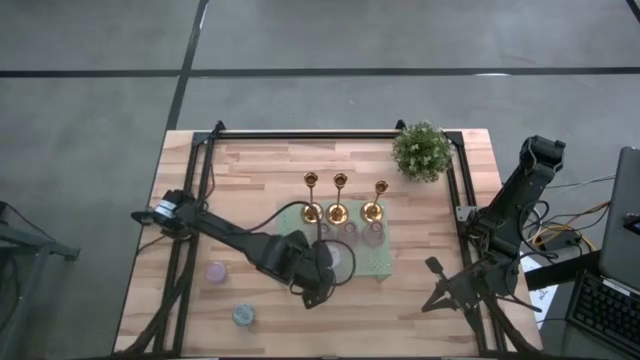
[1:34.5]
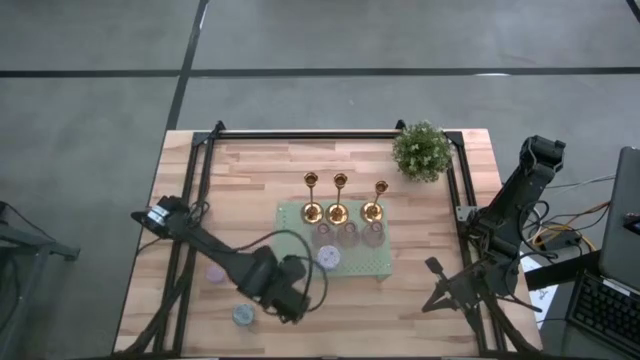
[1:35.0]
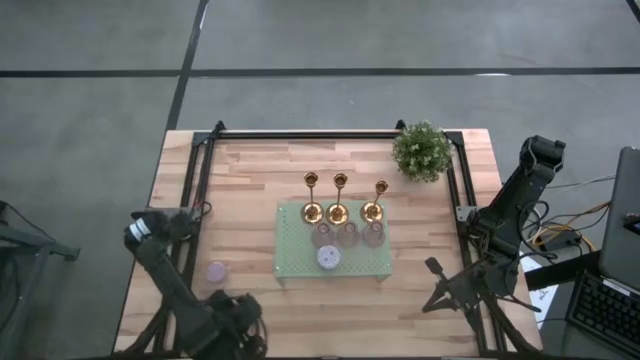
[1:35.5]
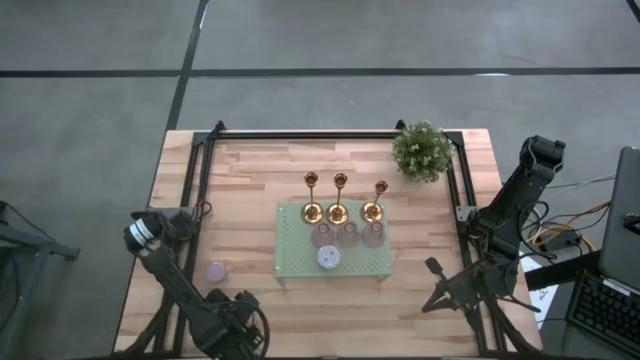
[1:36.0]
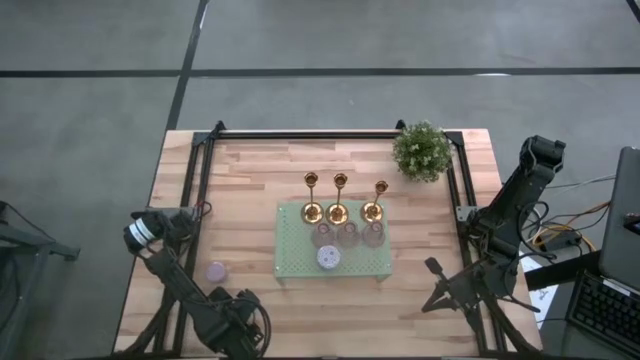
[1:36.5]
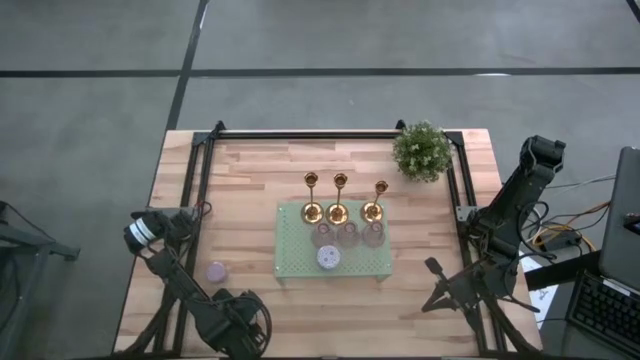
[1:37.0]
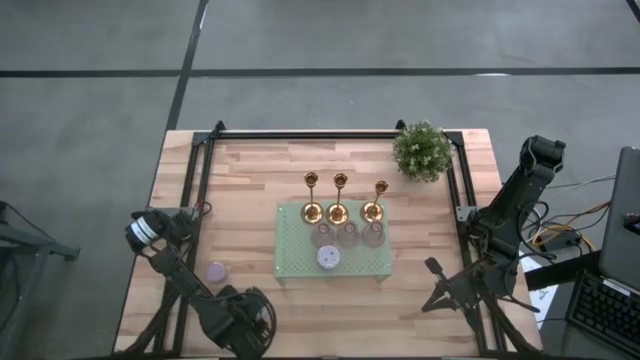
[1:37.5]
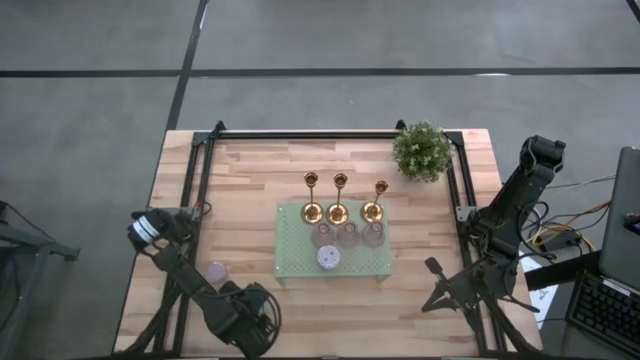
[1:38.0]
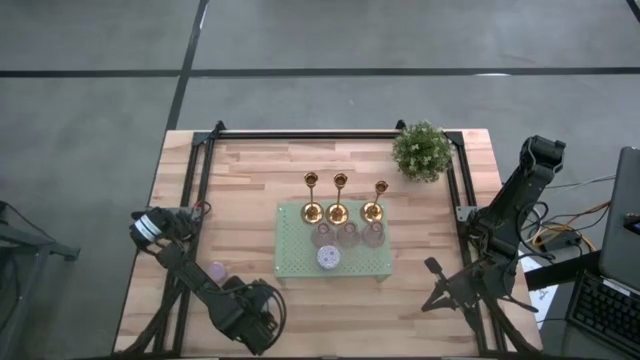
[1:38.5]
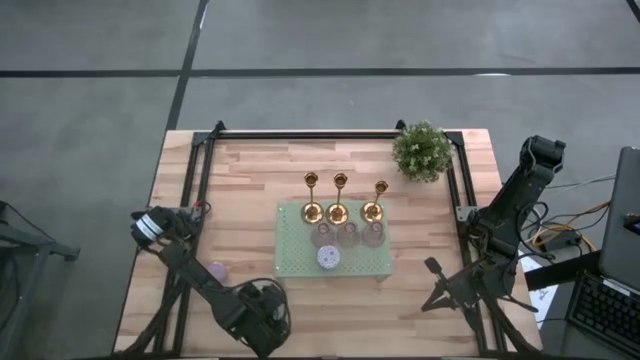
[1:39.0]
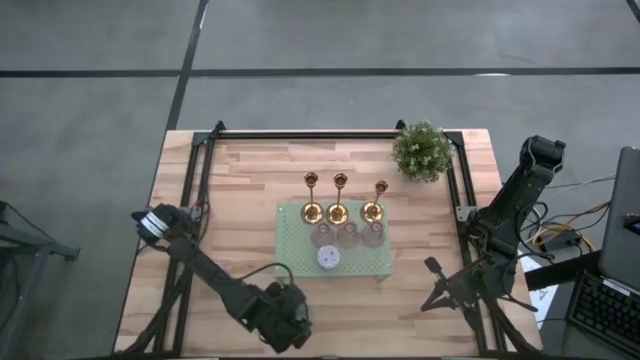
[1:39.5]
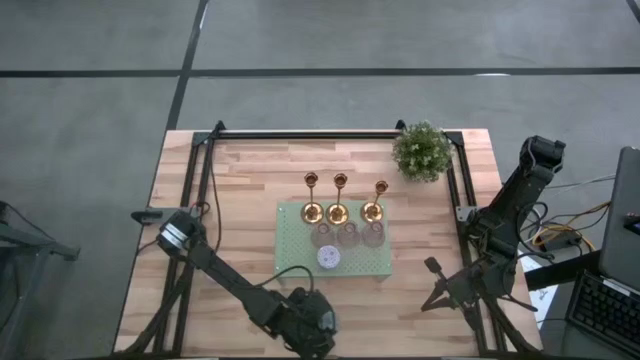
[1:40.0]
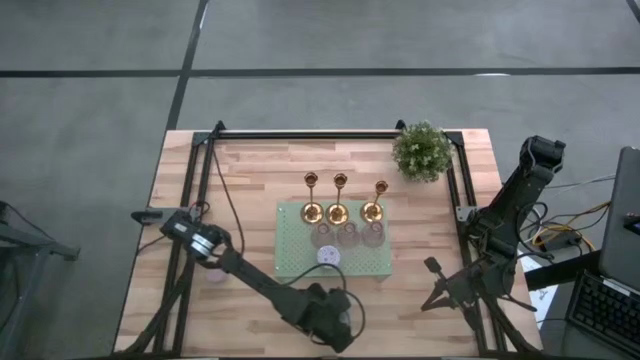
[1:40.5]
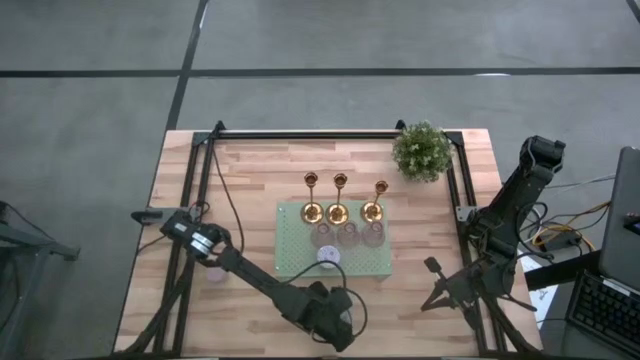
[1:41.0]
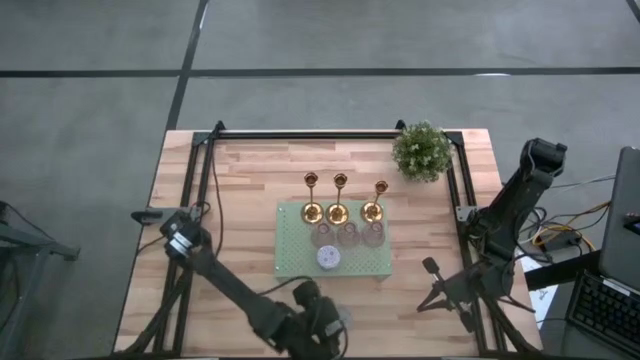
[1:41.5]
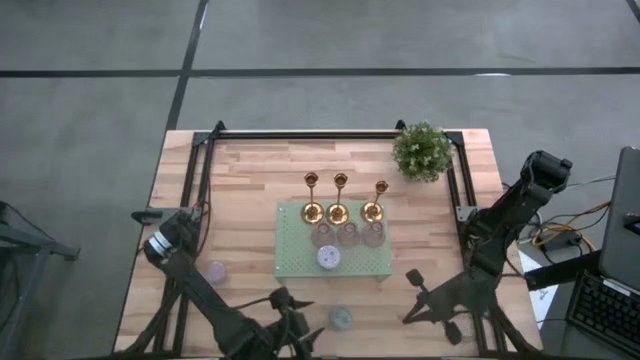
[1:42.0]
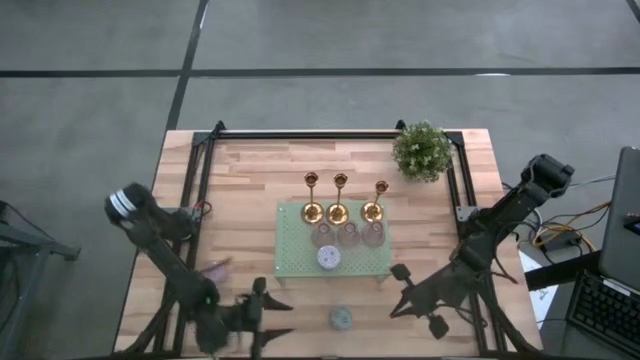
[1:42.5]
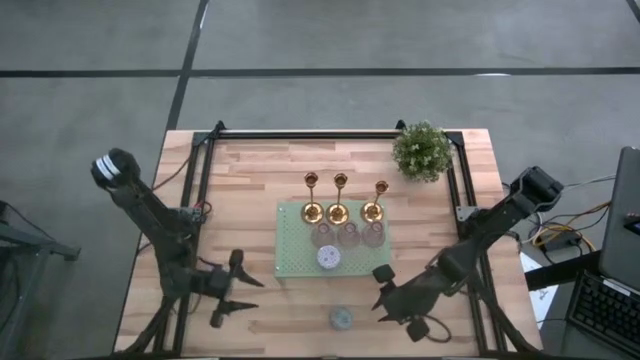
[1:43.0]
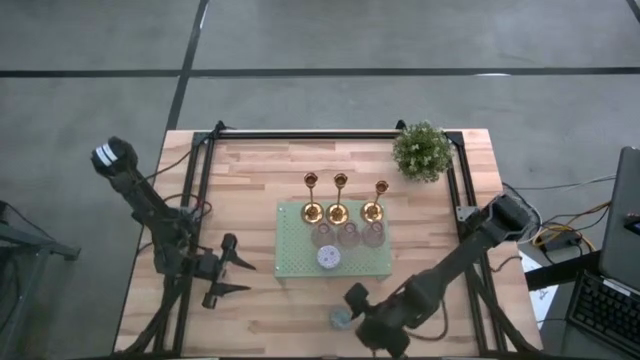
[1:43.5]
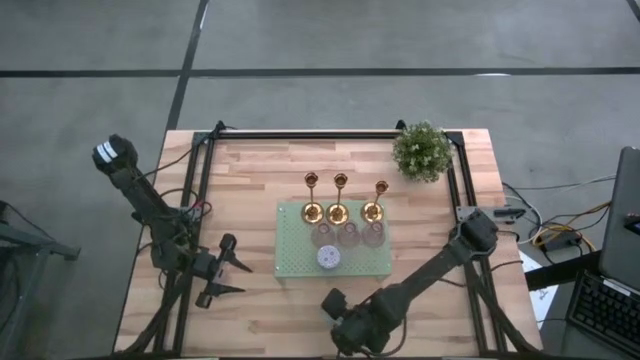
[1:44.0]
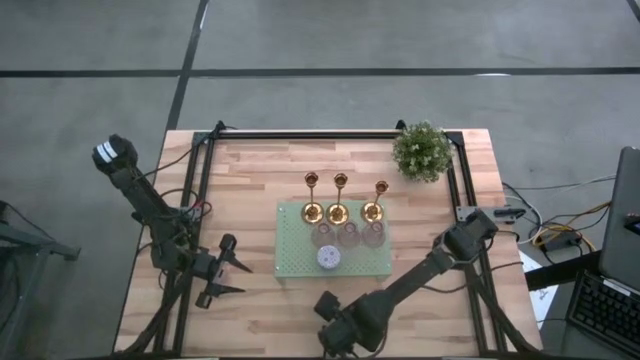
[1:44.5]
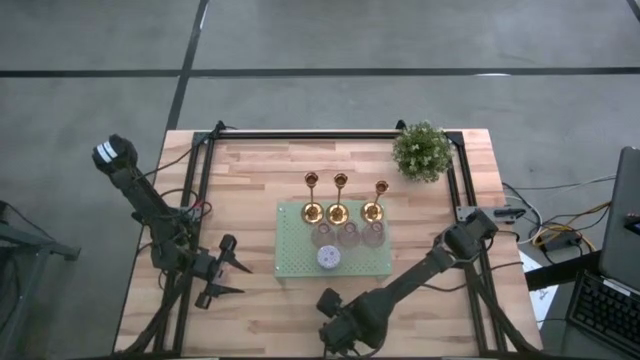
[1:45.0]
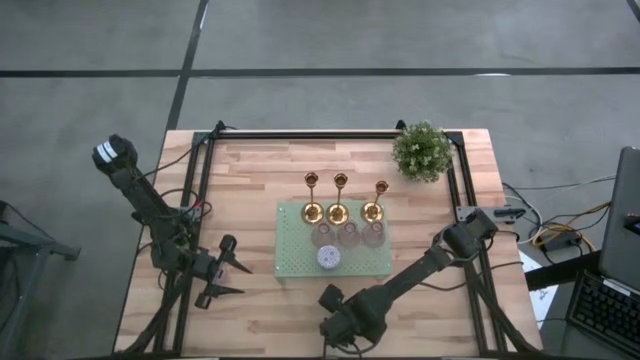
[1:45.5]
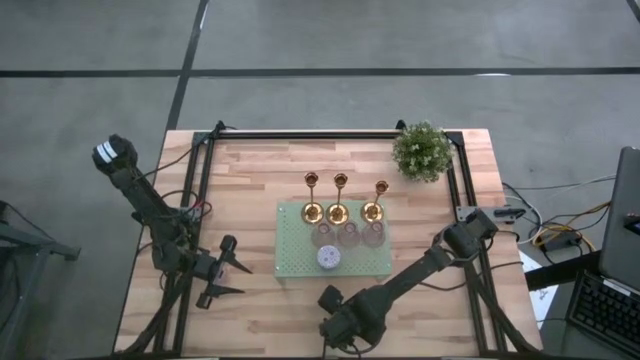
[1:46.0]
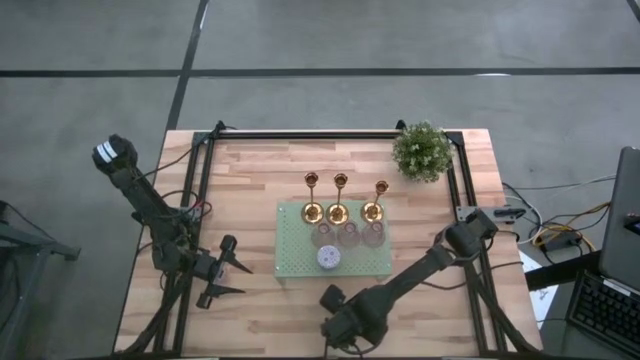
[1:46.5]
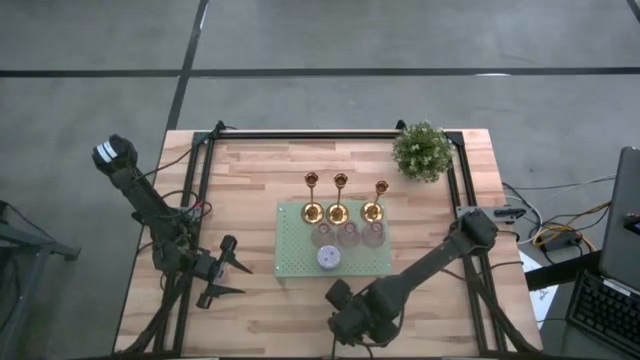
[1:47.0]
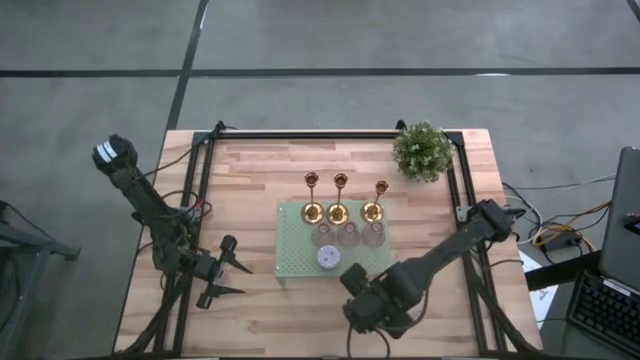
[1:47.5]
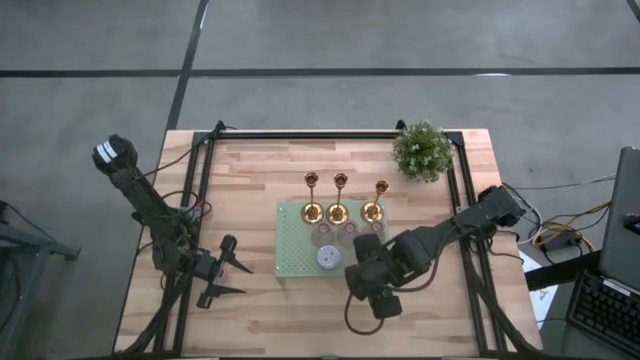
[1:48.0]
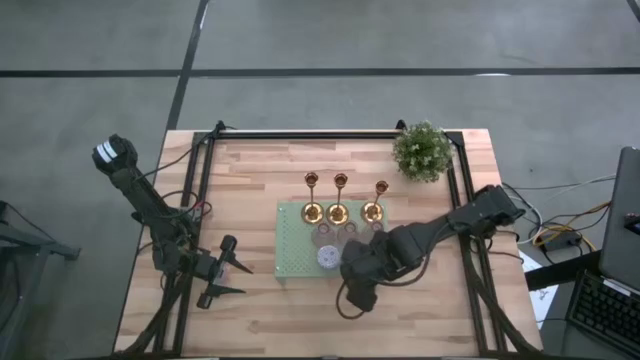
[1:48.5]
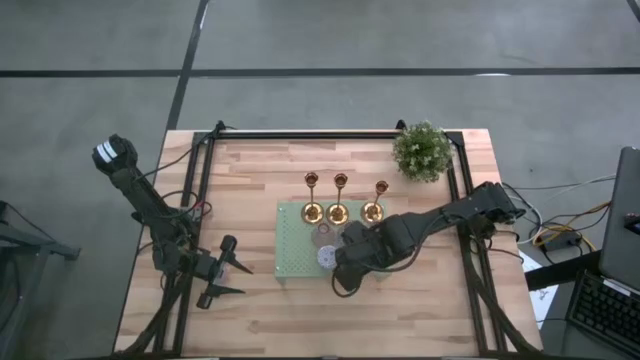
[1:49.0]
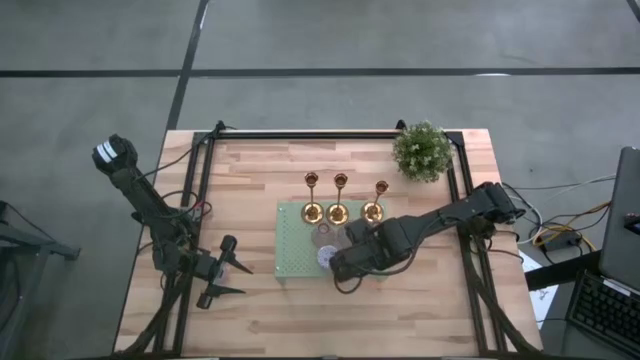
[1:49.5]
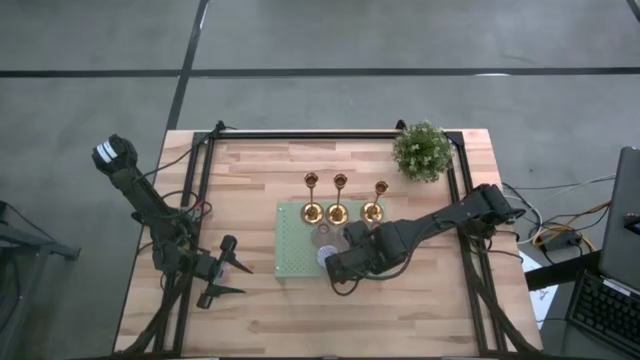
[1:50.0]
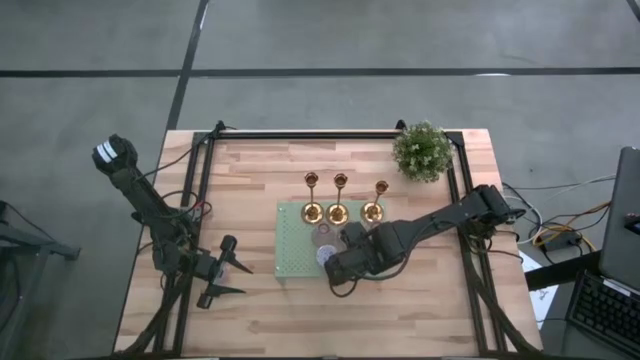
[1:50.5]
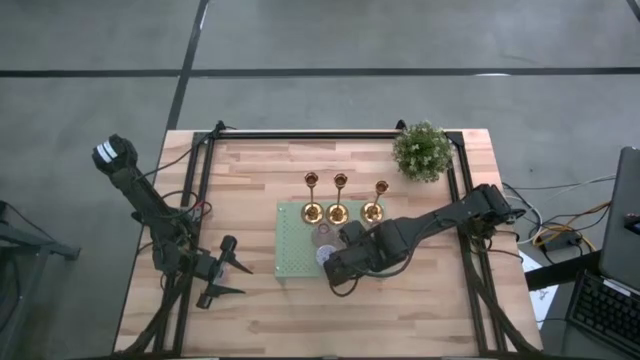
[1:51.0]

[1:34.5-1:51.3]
Task: Pick & Place candle stick holders
Put the blue scented candle on the shelf

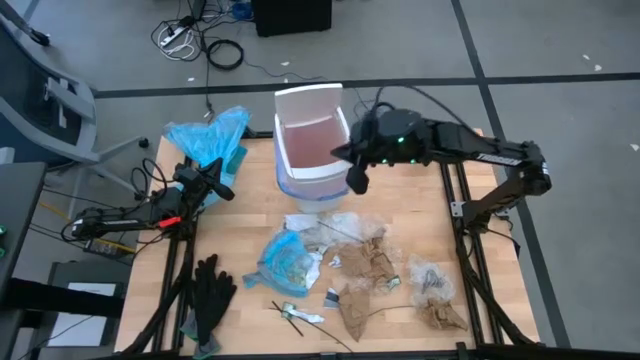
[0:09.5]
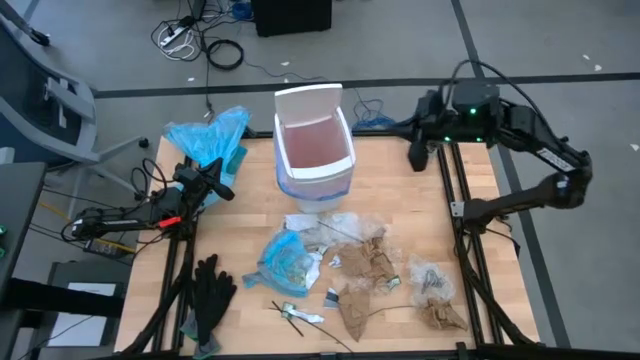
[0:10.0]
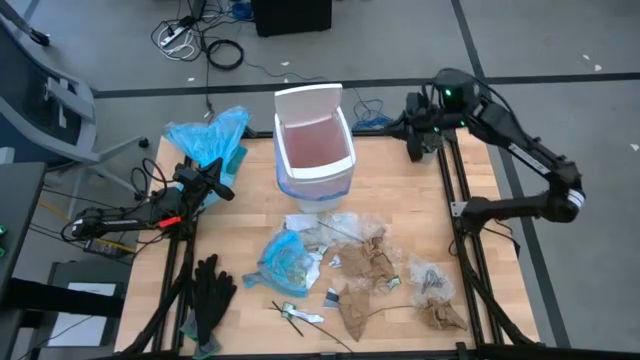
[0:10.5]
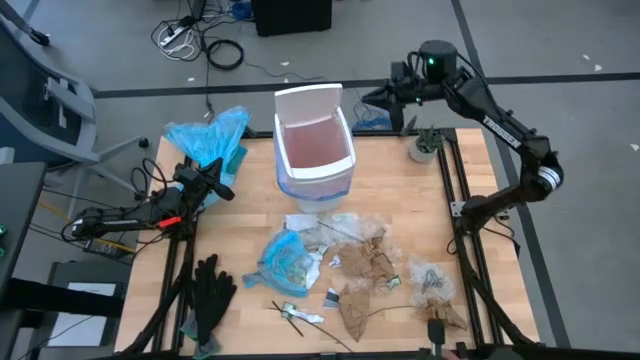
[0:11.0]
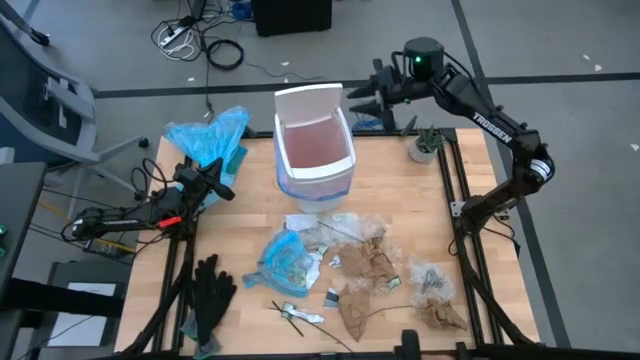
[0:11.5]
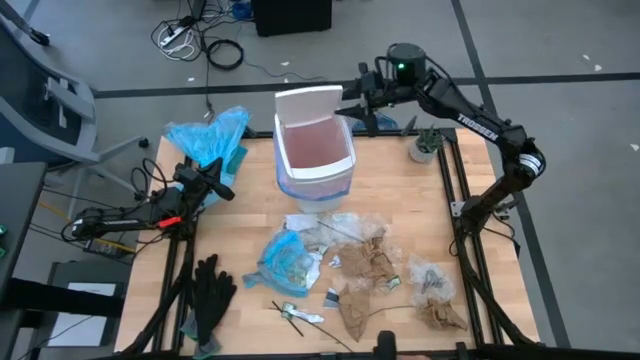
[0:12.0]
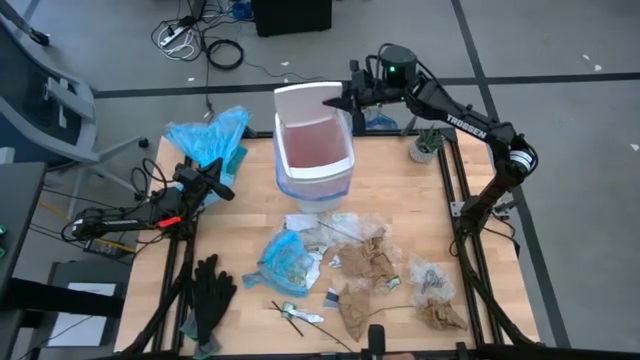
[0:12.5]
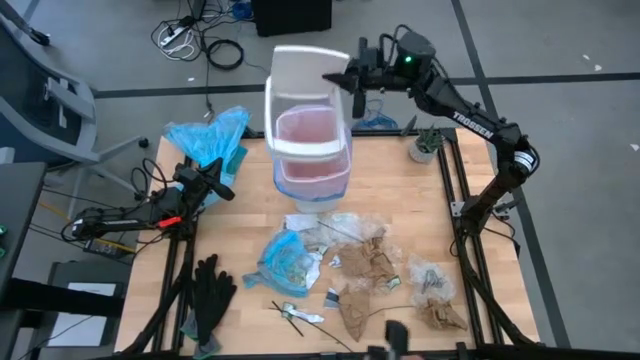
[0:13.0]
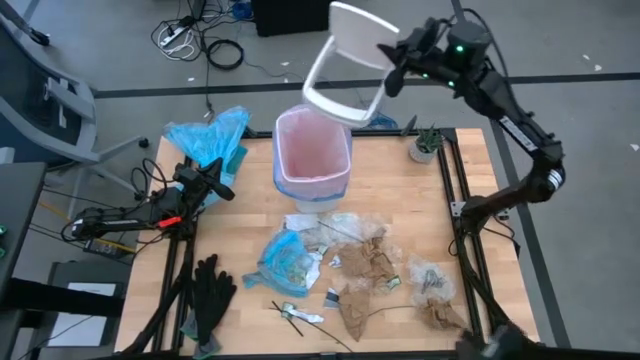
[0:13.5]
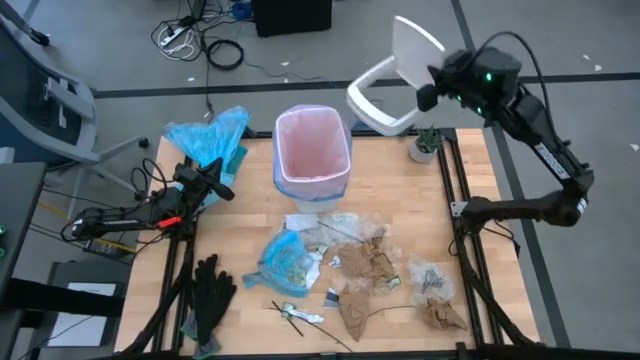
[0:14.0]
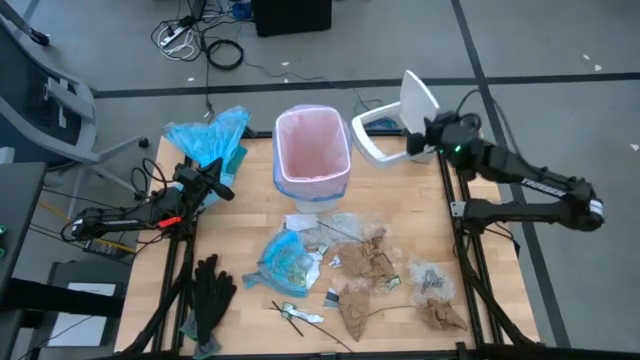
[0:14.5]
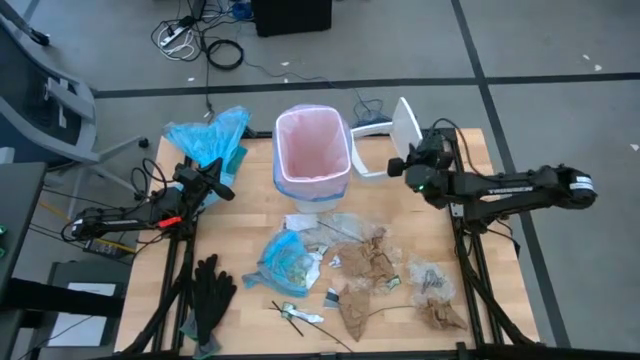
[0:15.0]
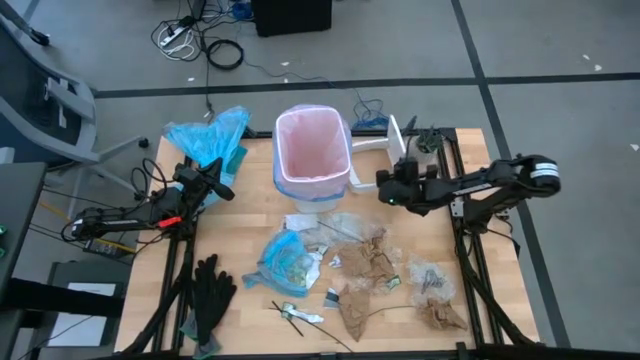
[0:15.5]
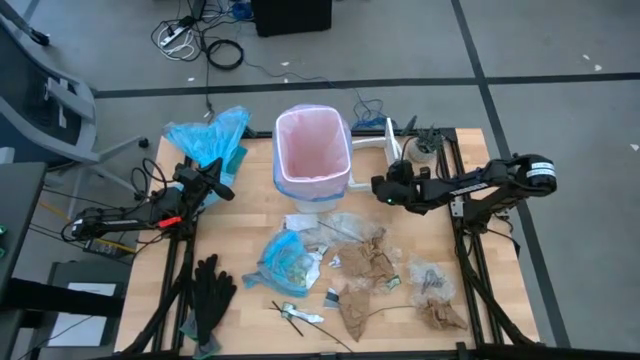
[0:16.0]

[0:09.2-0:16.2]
Task: place trash/remove bag and relplace
Remove the white trash bin cover
